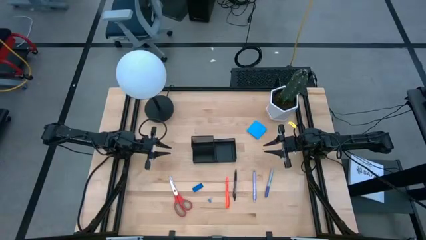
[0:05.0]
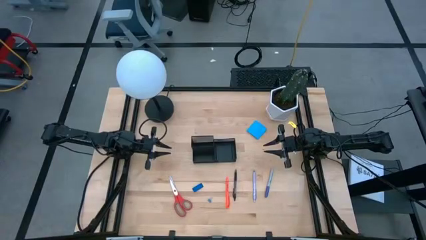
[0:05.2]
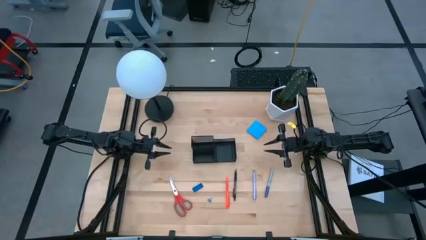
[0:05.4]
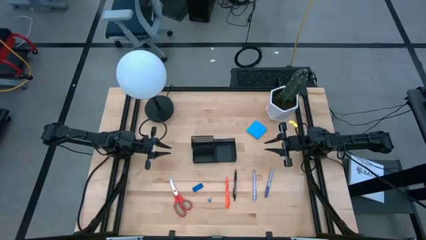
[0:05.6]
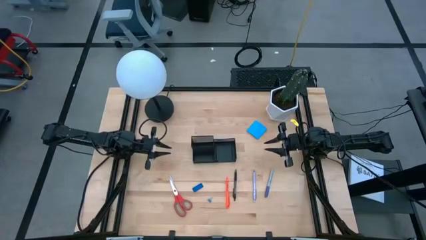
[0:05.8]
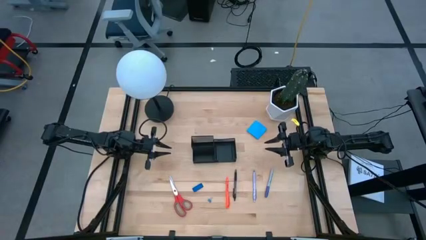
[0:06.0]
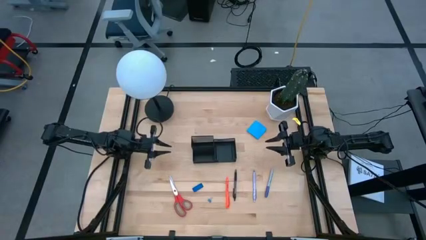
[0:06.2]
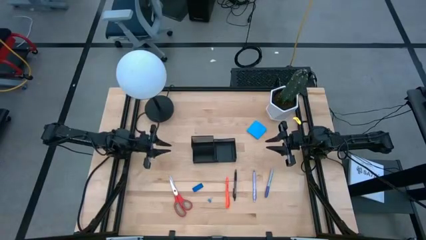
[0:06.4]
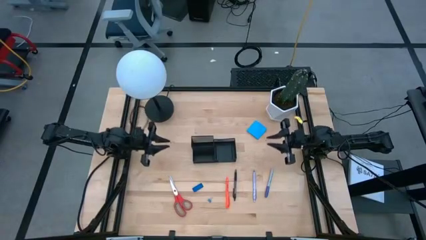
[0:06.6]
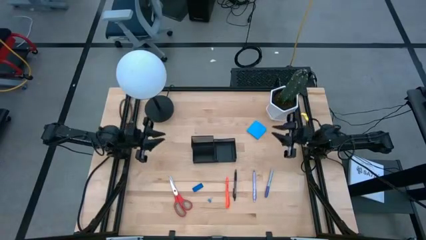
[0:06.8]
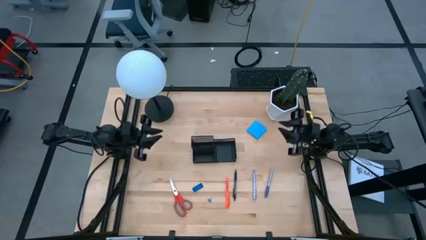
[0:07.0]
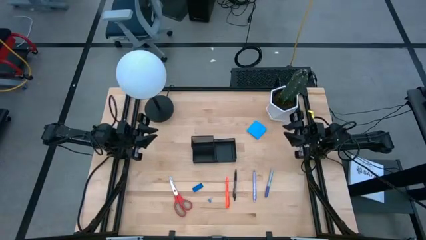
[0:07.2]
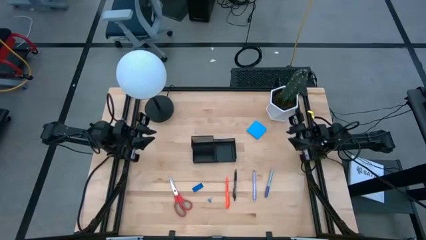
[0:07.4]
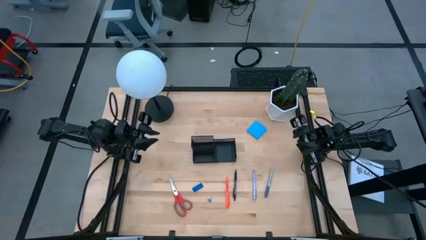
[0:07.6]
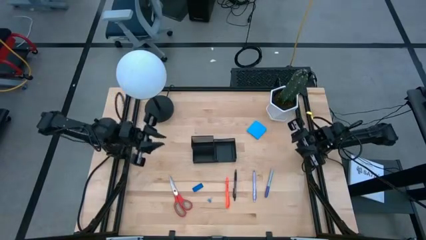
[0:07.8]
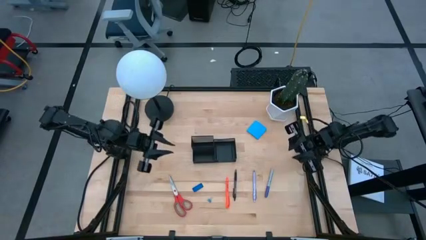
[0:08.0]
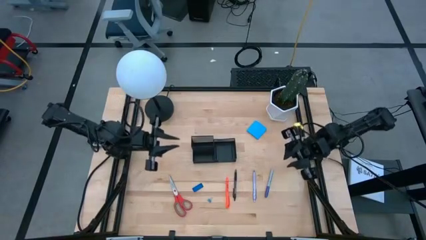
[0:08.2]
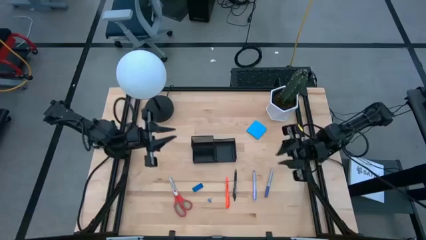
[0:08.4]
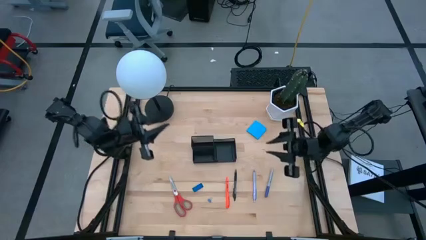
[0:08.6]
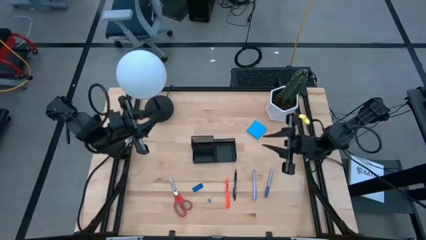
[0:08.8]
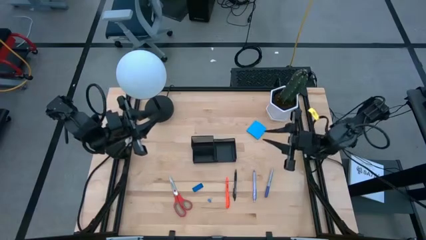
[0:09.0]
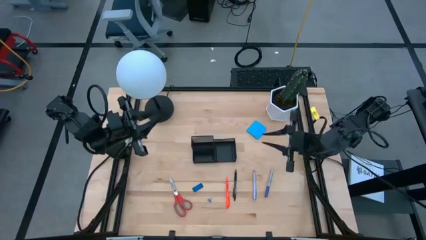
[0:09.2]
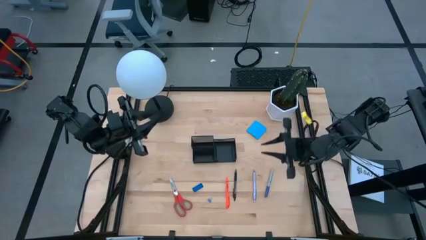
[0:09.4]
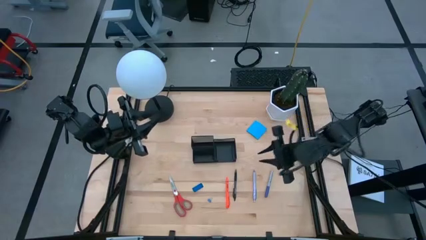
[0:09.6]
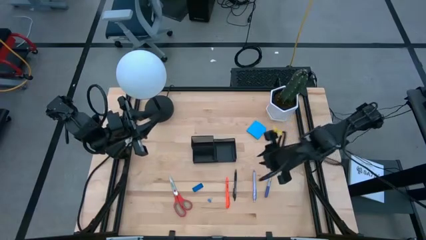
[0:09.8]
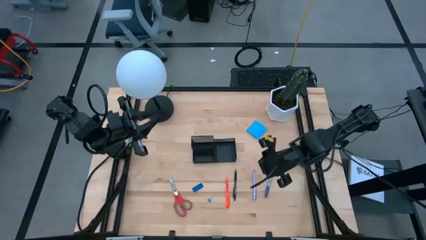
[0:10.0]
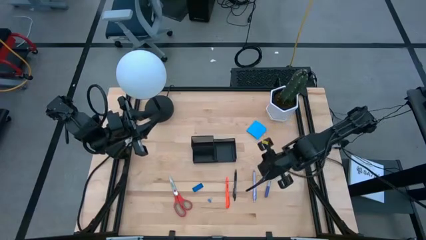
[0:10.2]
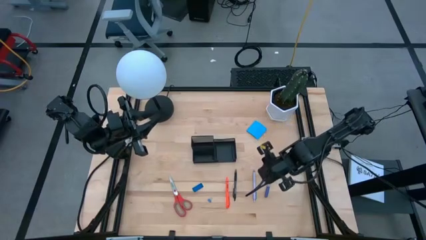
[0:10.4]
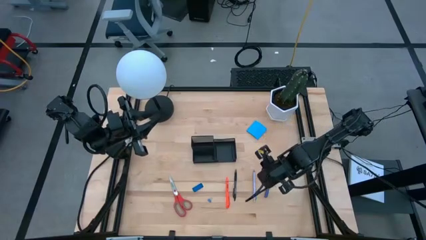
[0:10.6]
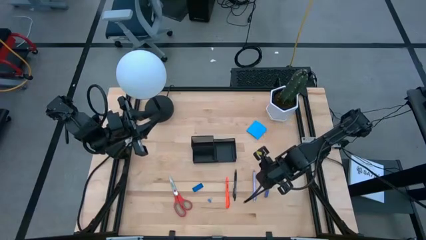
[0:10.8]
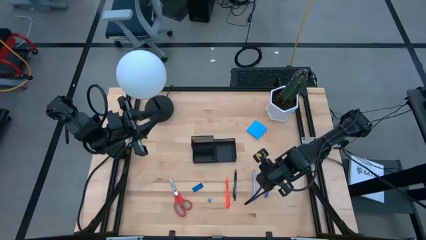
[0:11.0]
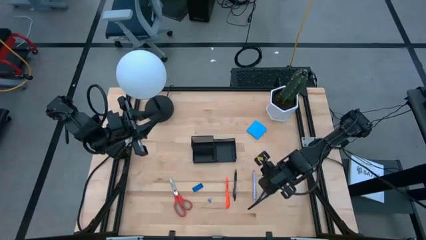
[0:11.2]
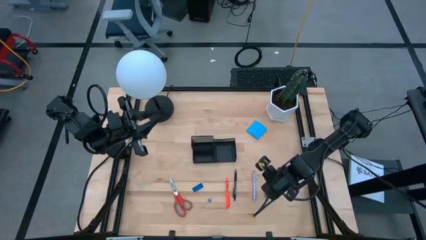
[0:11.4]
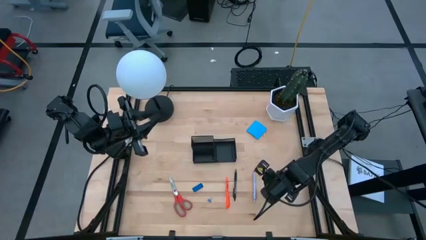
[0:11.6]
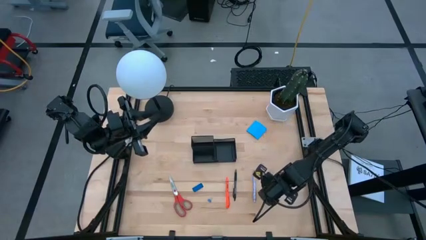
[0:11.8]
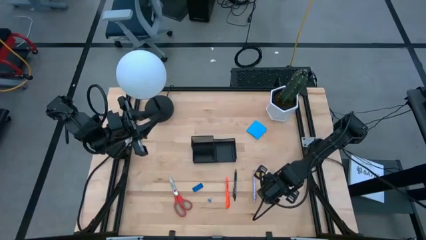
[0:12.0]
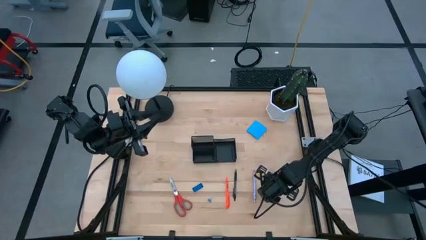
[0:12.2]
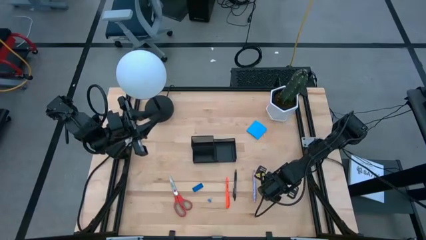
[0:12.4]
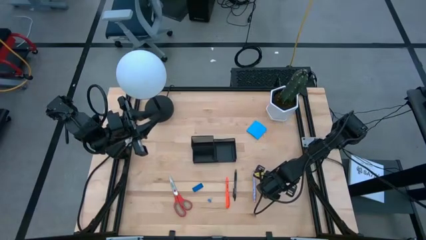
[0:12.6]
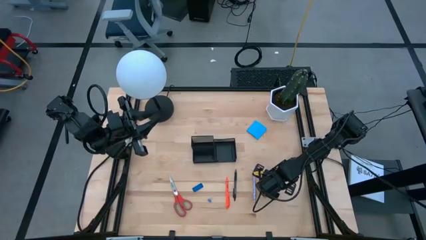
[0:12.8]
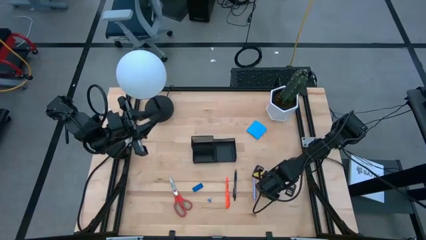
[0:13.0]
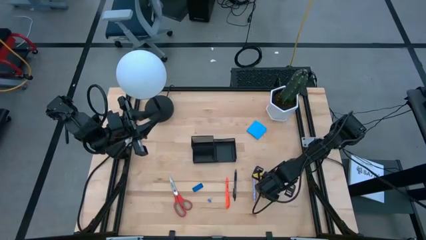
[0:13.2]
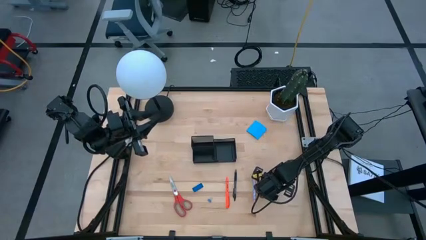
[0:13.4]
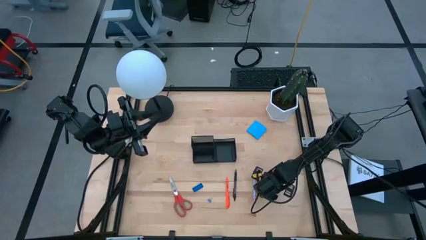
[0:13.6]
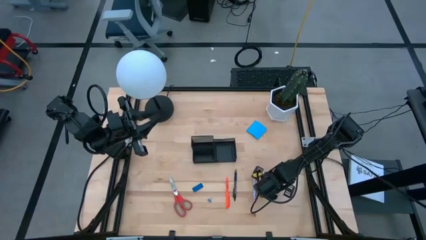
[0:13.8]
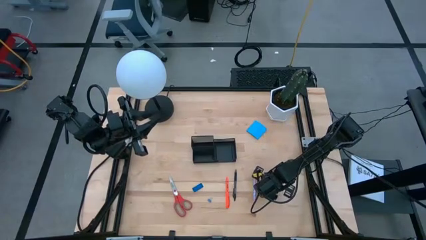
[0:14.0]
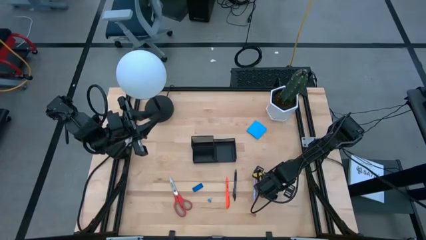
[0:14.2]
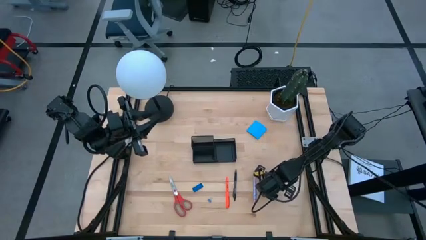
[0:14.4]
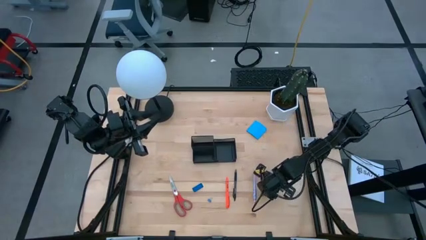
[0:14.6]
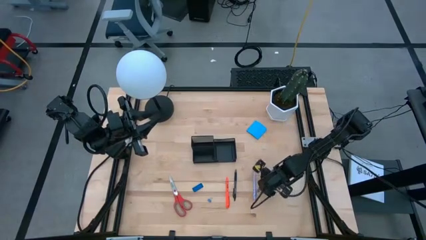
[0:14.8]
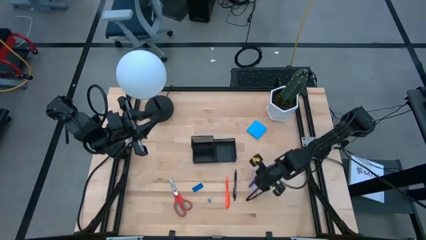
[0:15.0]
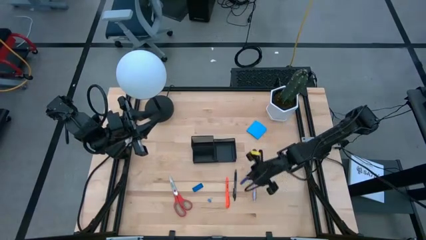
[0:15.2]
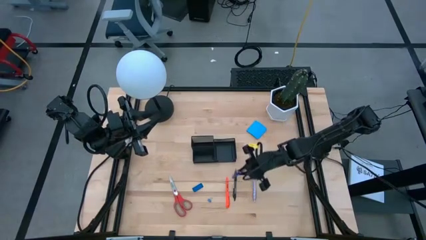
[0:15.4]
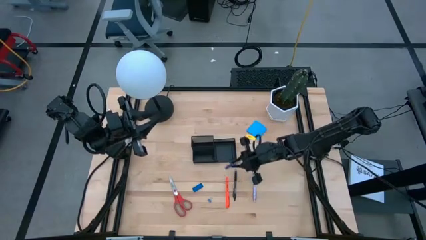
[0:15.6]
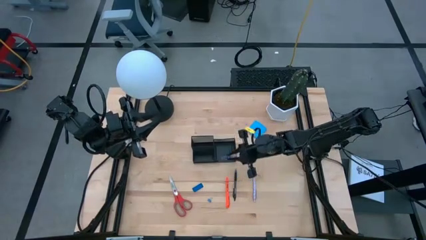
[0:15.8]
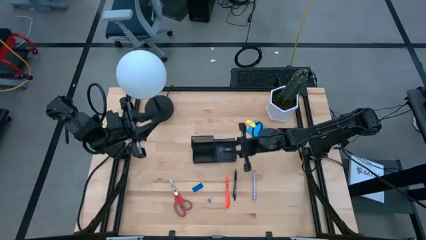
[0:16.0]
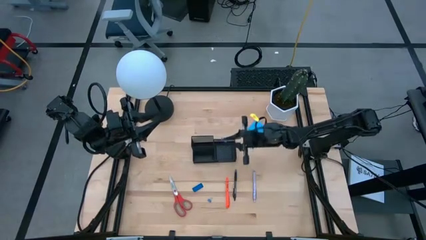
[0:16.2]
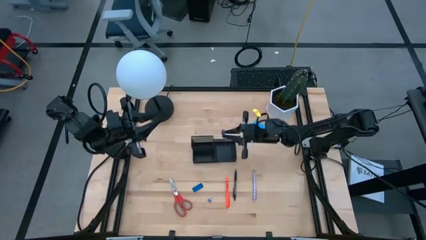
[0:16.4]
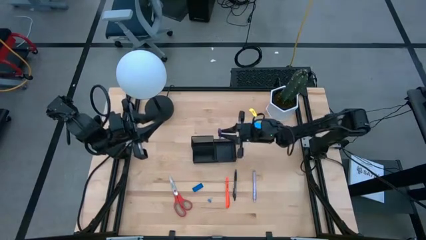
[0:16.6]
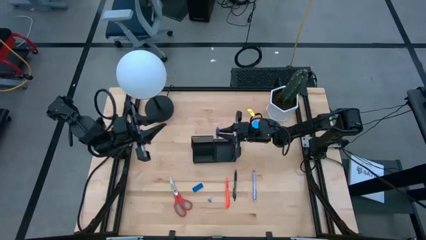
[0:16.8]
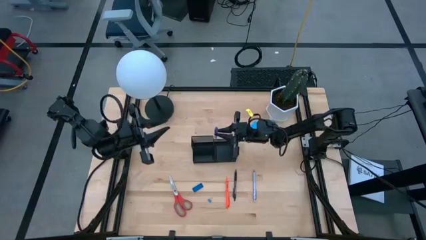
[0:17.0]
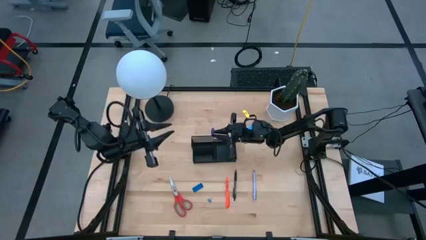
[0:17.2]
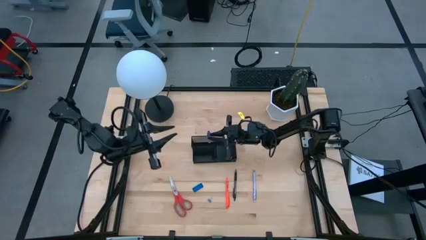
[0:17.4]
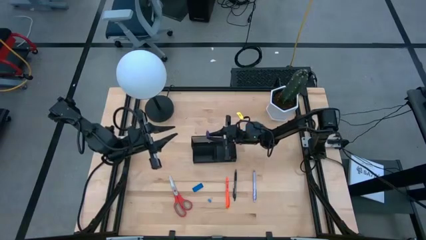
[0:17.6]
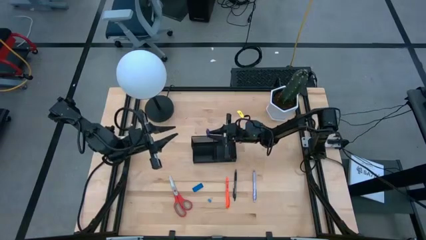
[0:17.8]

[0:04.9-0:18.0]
Task: Pick and place office supplies into organizer
Put the blue highlighter into the black desk organizer
